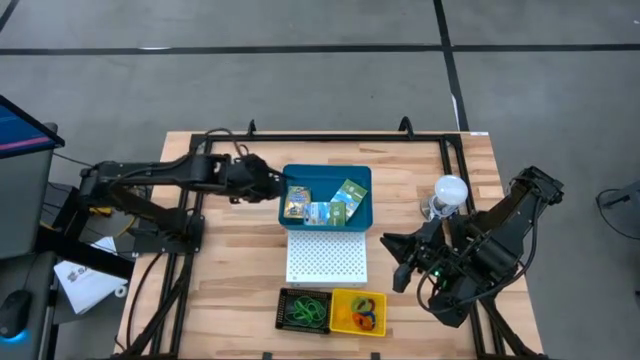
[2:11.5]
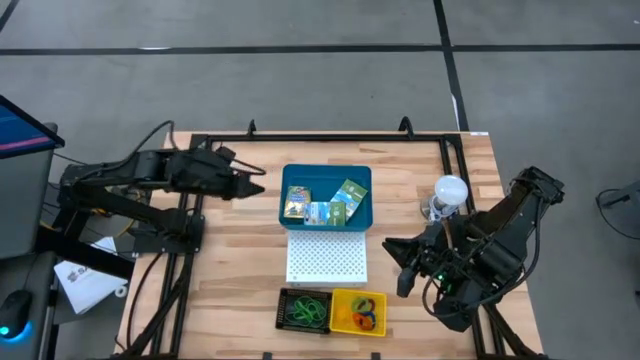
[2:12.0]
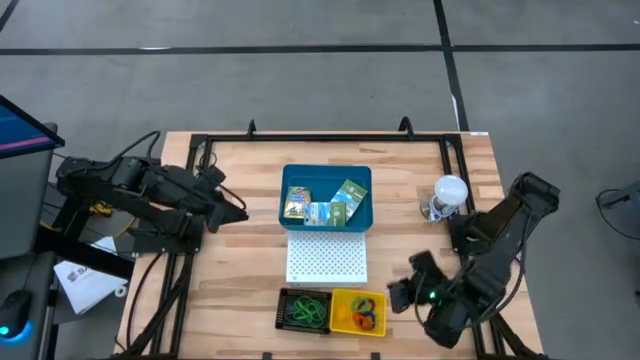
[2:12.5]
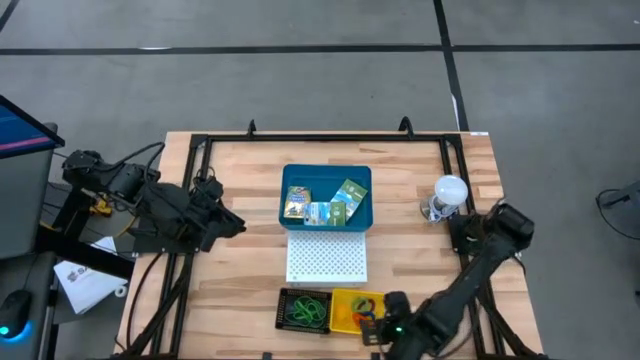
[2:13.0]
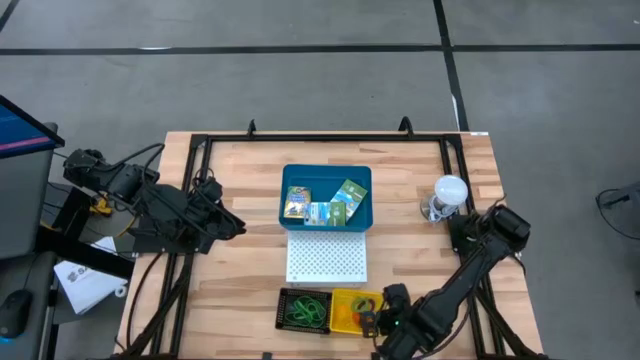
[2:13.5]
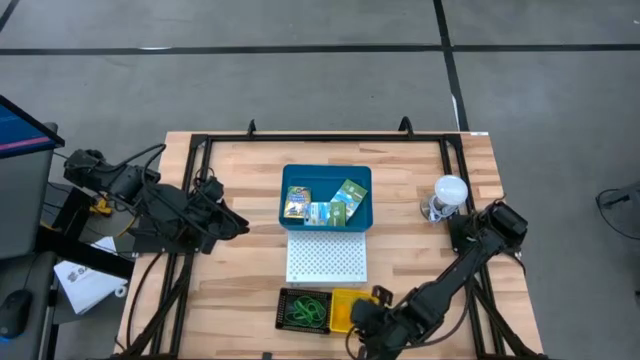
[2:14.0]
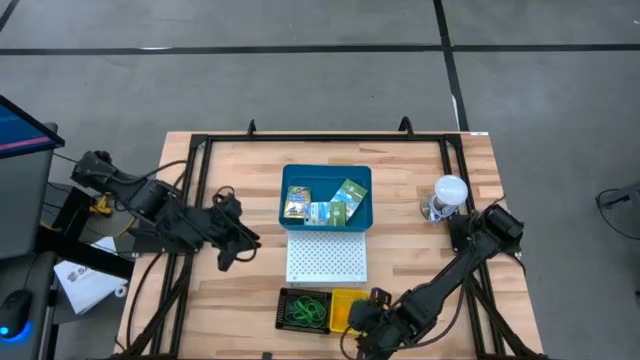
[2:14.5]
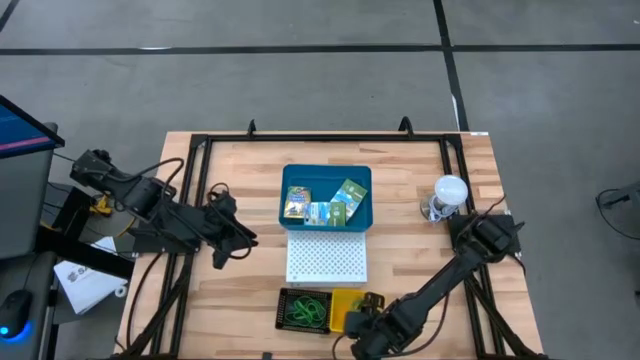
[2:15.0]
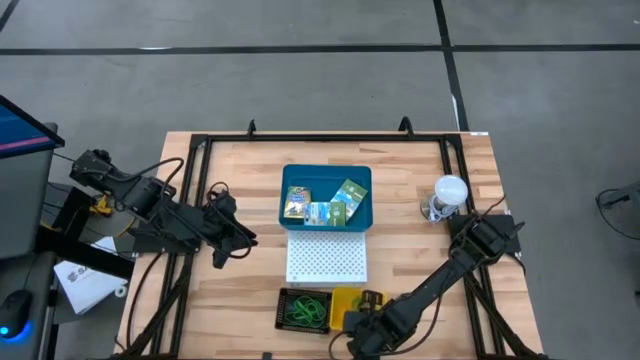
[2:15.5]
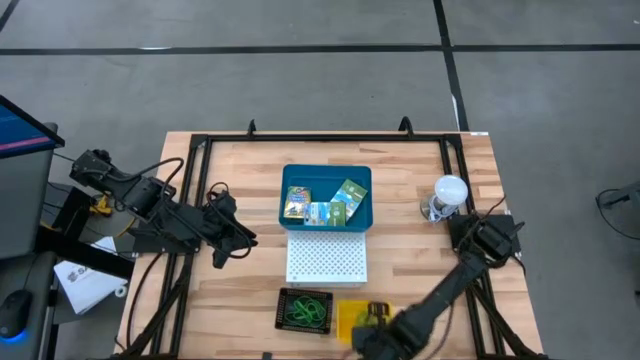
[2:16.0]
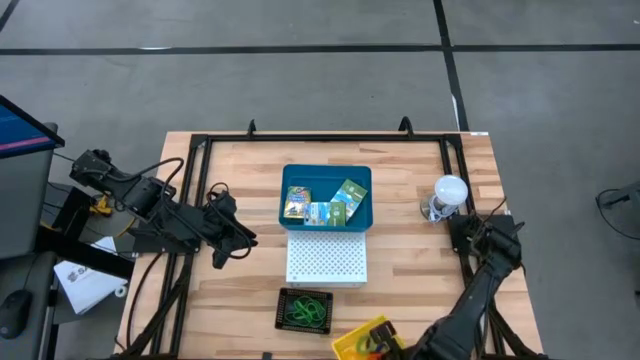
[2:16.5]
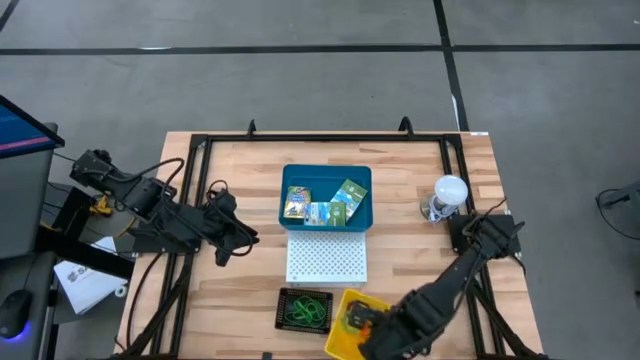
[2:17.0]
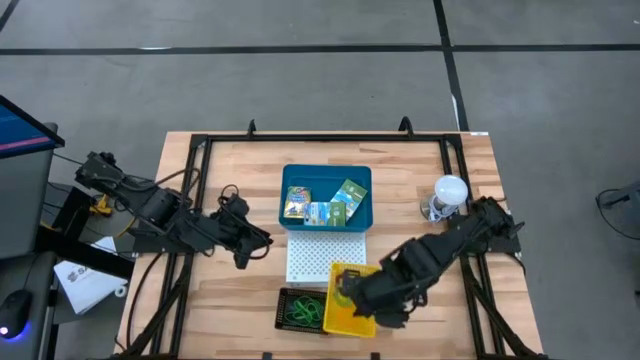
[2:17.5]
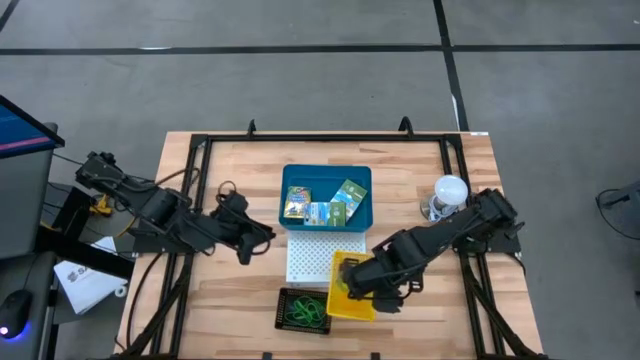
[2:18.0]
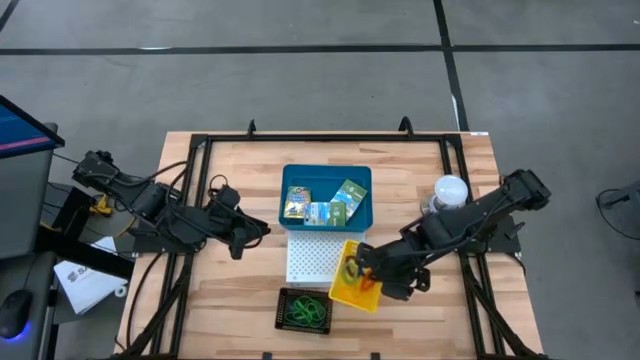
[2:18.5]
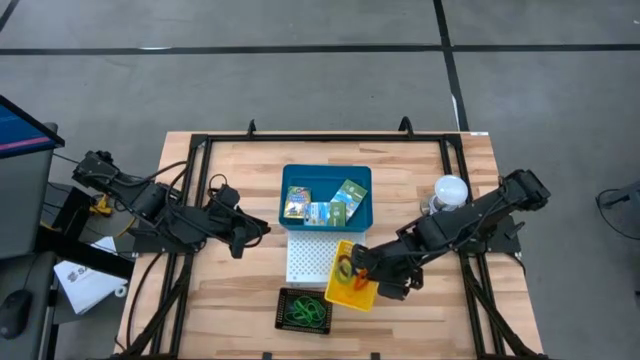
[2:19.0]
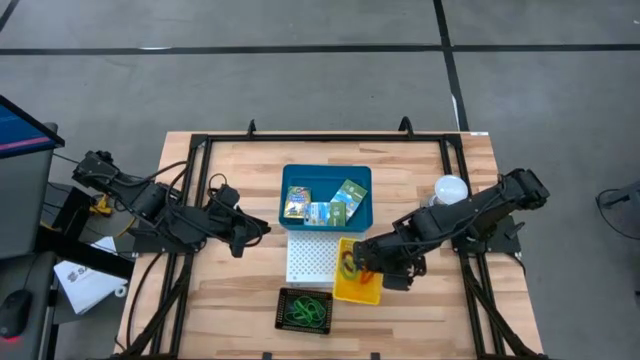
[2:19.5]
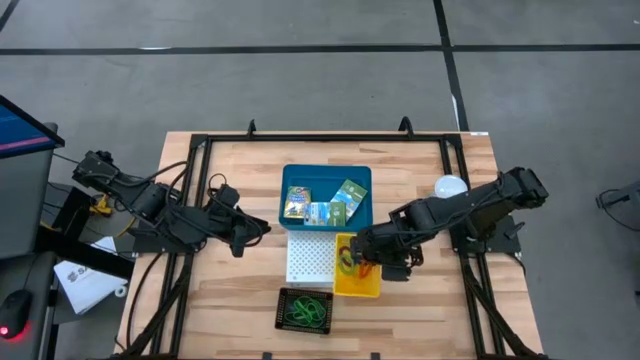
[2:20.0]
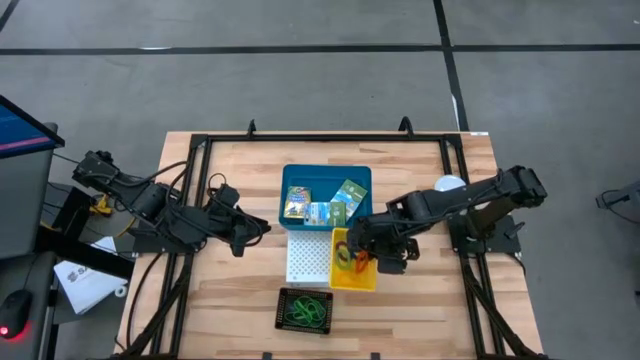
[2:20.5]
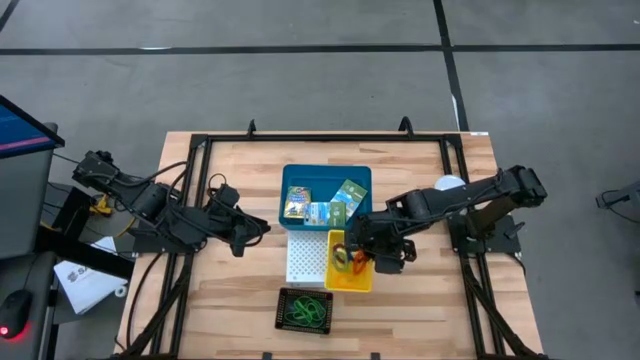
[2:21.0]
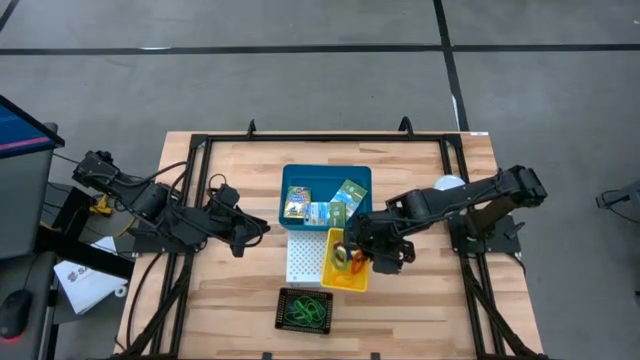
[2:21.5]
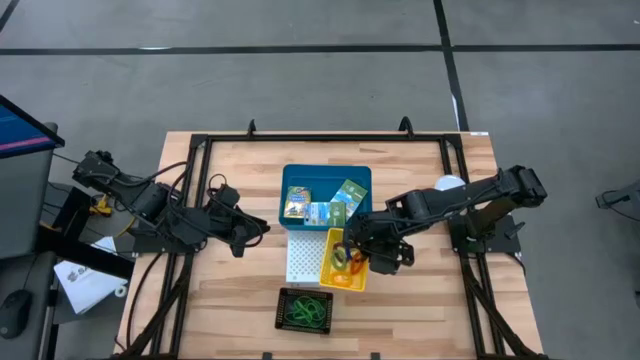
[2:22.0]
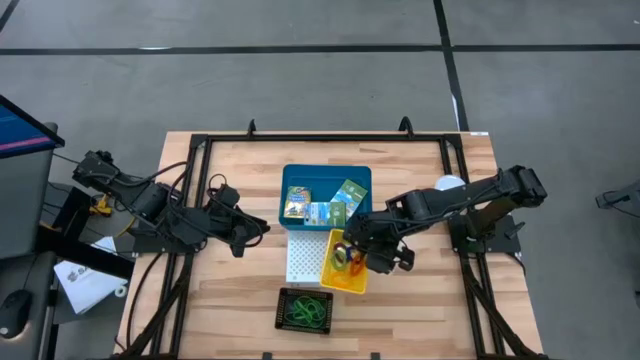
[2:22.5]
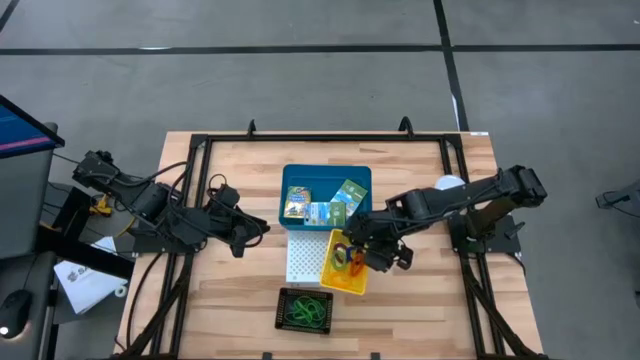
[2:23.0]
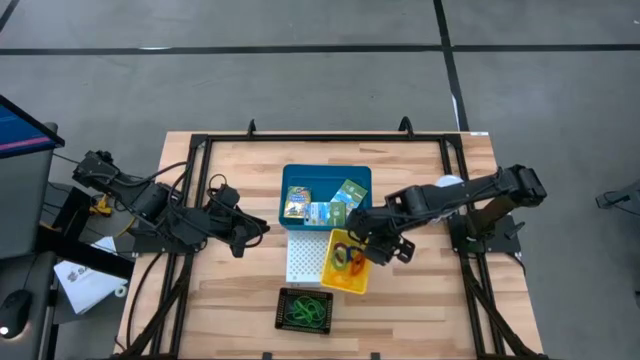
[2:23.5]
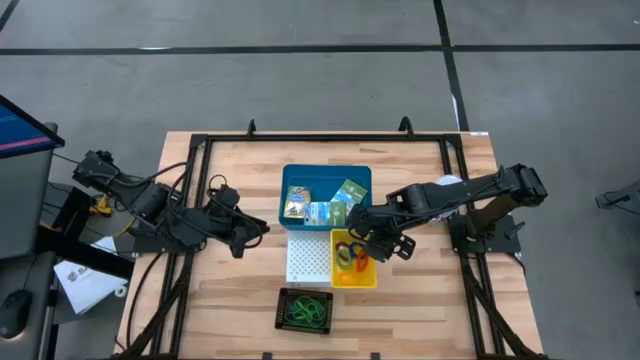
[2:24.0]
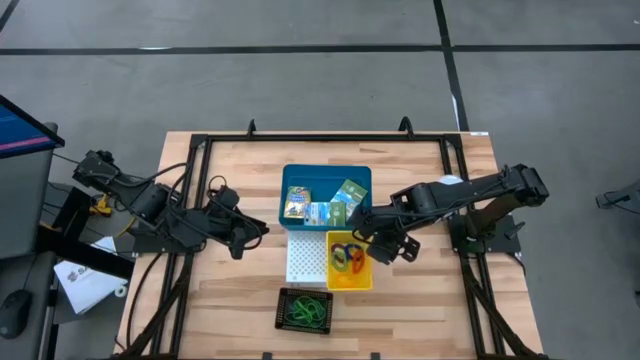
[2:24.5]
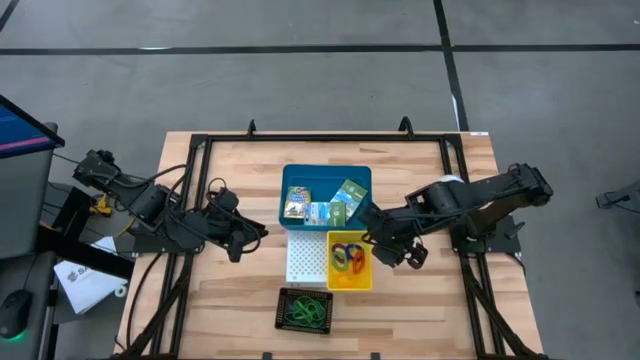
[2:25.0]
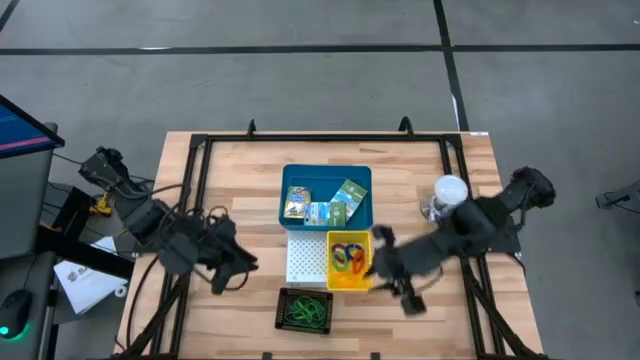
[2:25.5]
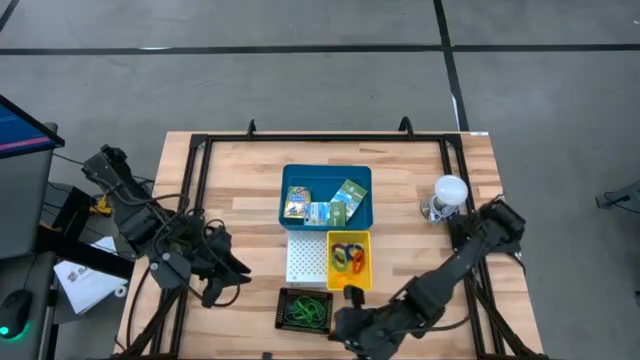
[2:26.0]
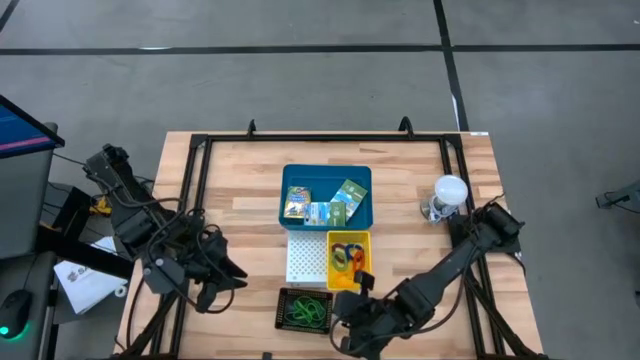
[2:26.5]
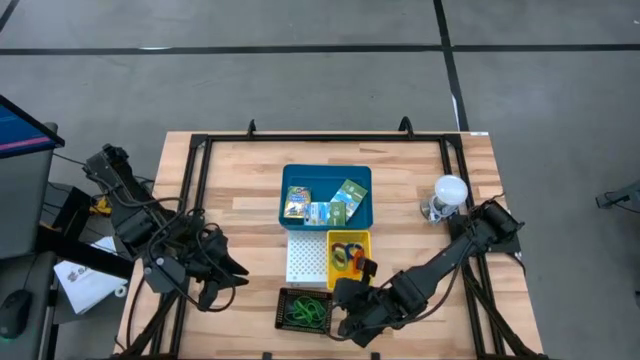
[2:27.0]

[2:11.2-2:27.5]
Task: Pick & Place Office Desk Supplies
Put the yellow bin on the shelf
